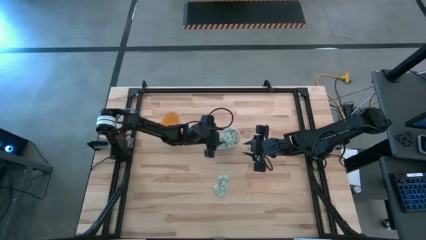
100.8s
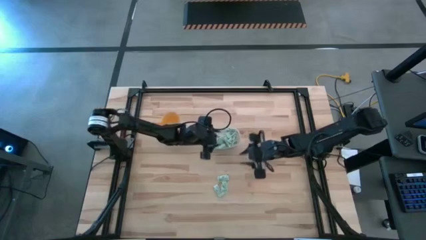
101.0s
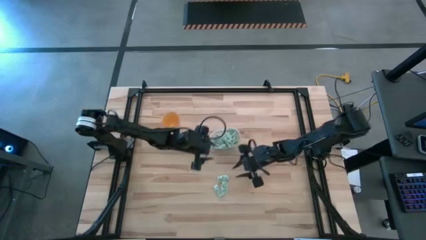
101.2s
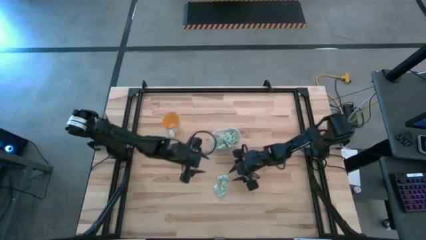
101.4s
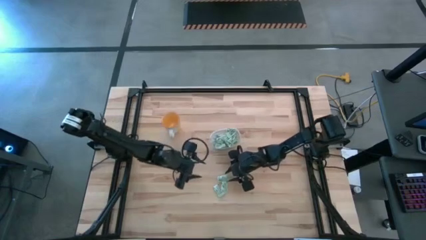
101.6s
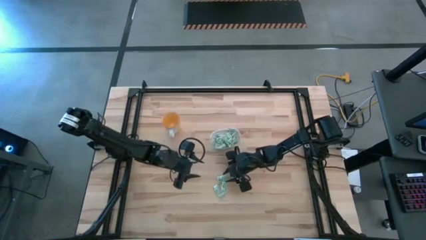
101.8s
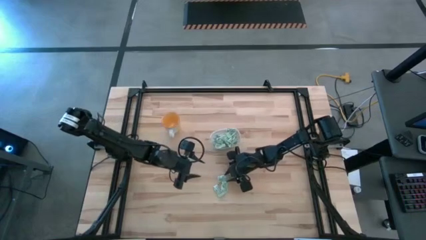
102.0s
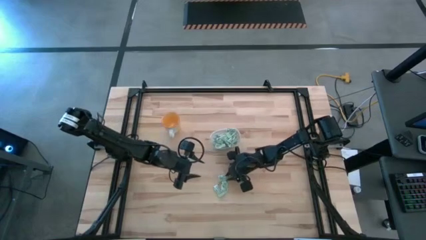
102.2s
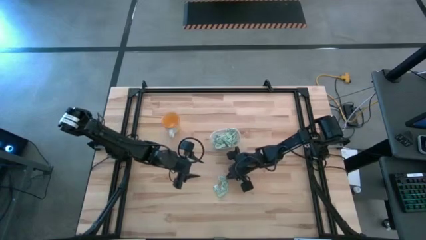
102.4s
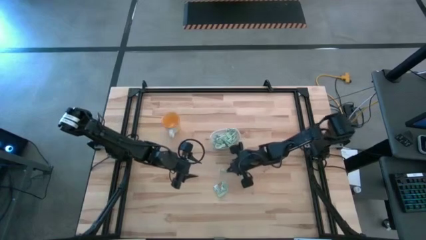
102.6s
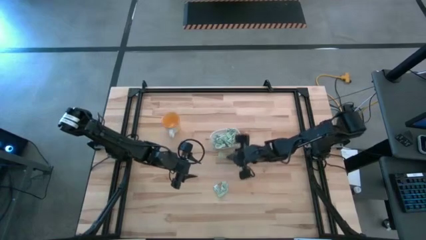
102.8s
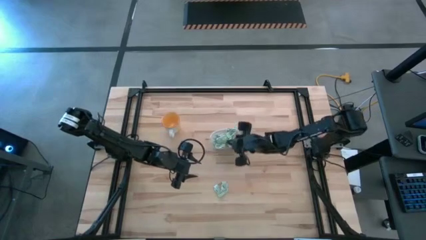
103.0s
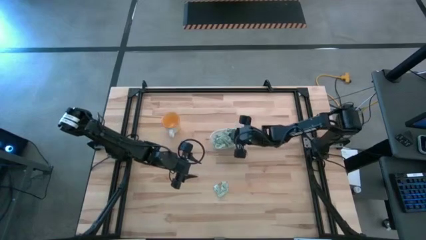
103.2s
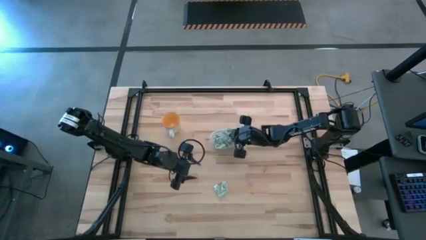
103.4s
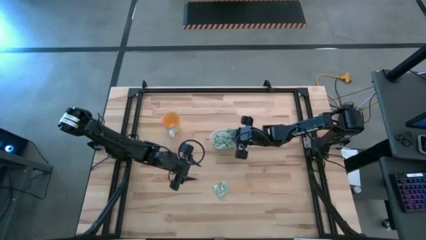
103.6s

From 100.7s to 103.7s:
Task: Pick and place Stevia / Truvia into bins
Put the stevia packet into the transparent bin

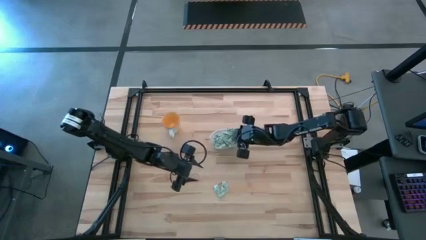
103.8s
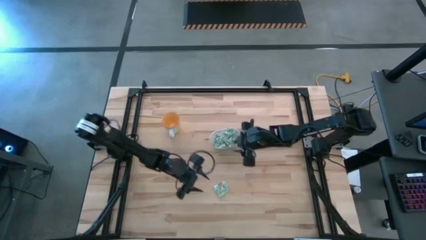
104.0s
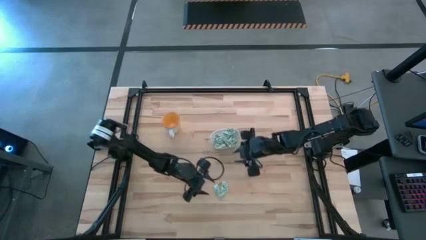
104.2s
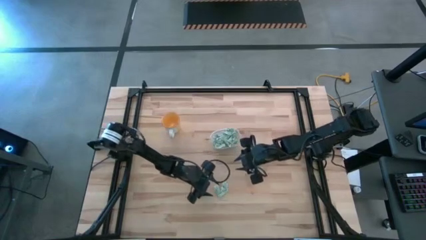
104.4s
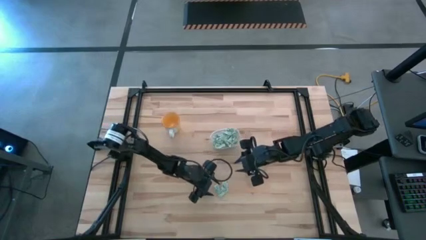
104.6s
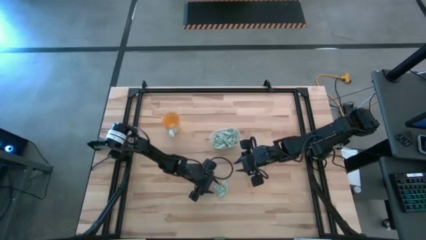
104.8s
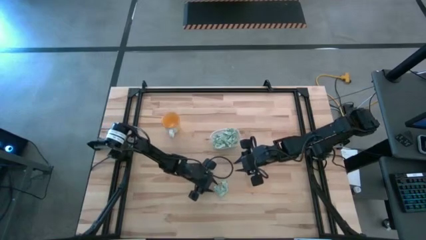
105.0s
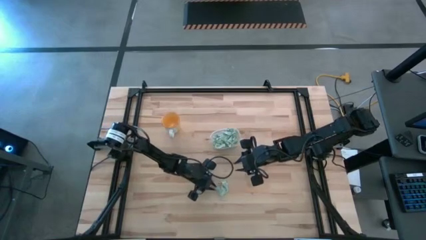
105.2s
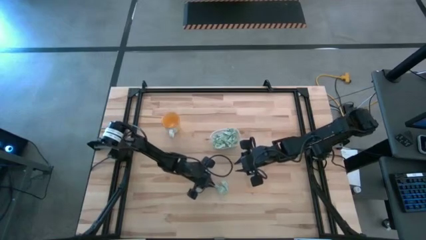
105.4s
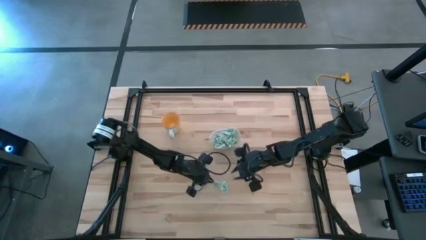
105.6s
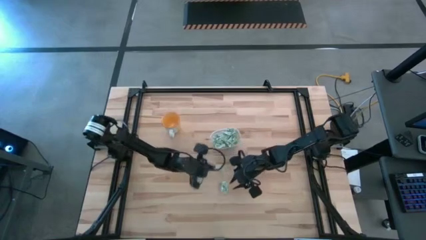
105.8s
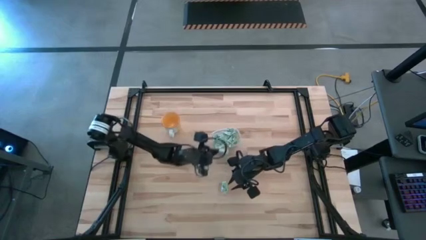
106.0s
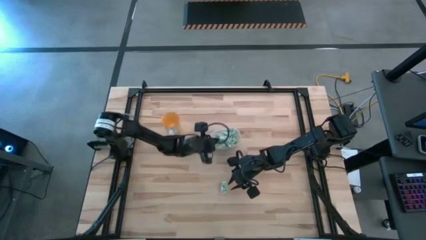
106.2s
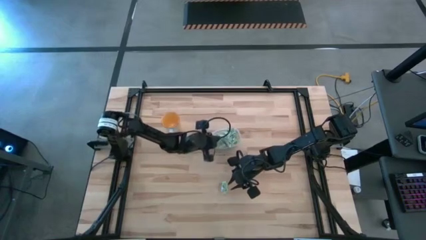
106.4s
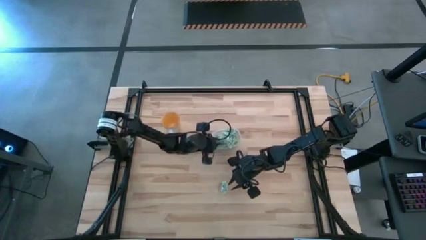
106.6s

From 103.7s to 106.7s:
Put the stevia packet into the transparent bin

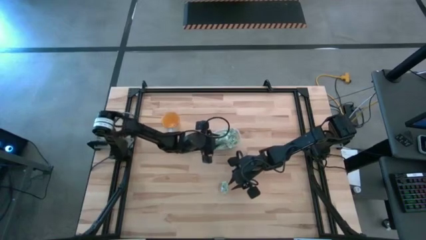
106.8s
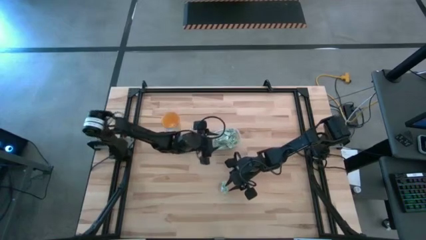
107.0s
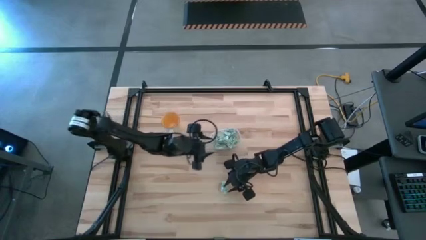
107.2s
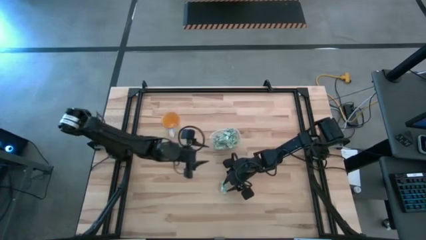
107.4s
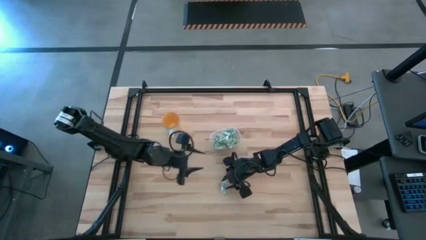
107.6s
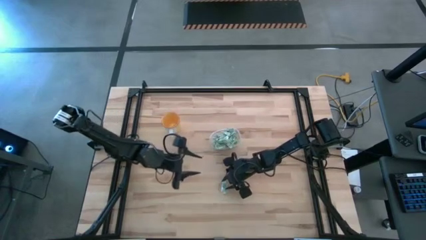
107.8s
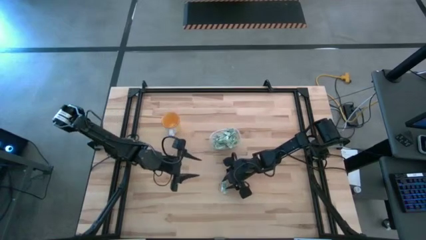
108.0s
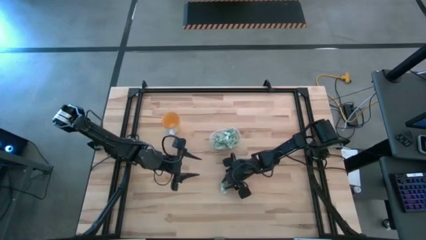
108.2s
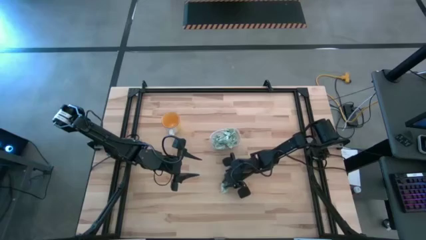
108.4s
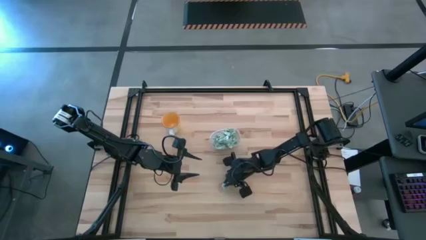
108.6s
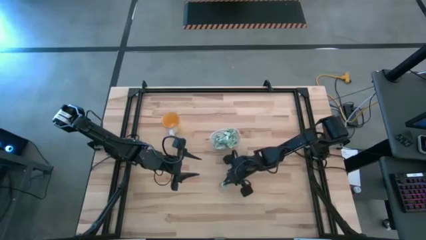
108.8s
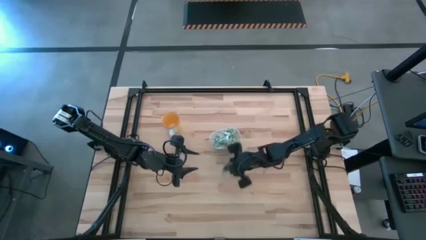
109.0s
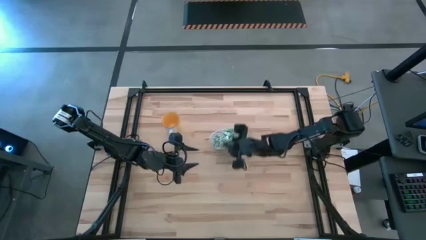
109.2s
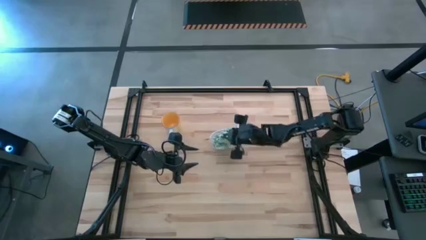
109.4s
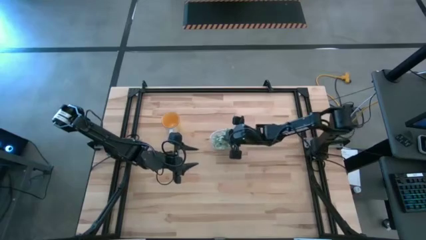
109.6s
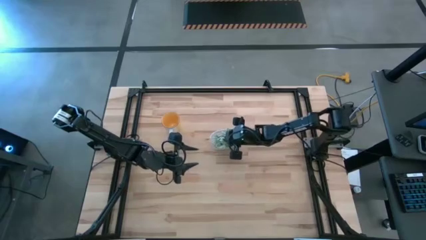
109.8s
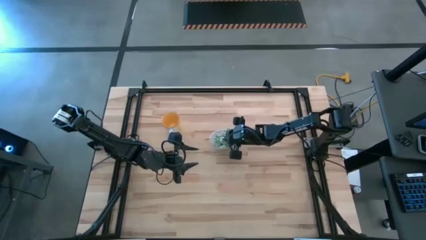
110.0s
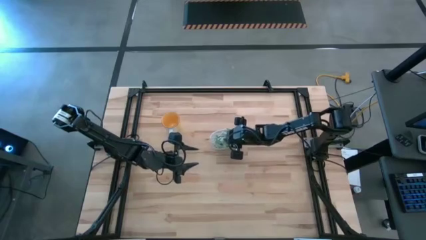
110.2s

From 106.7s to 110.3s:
Put the stevia packet into the transparent bin

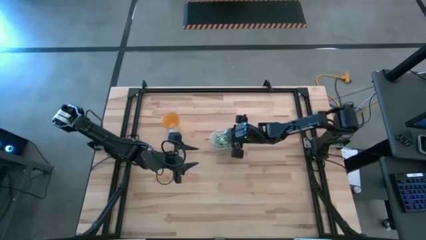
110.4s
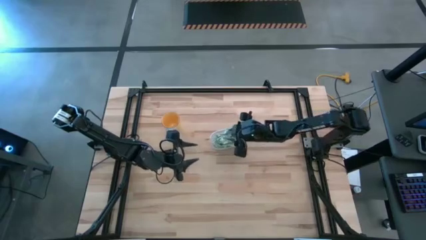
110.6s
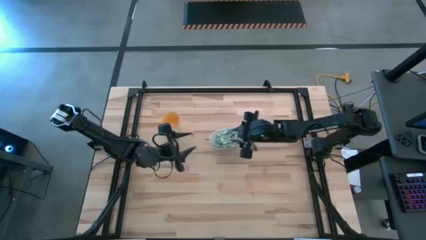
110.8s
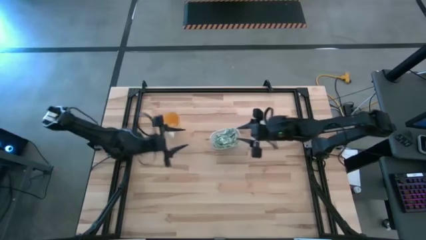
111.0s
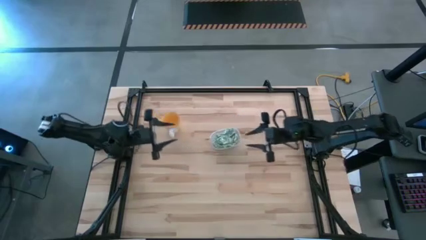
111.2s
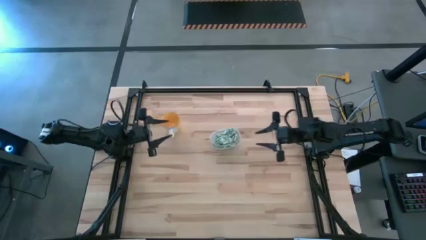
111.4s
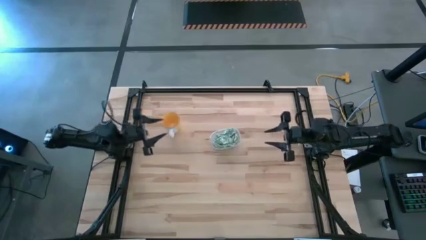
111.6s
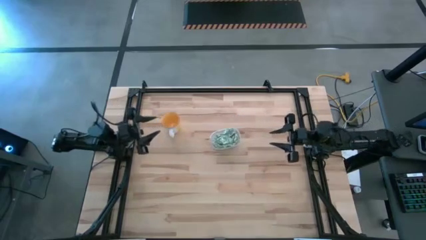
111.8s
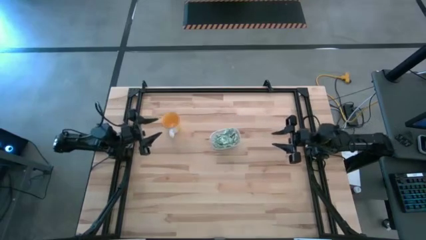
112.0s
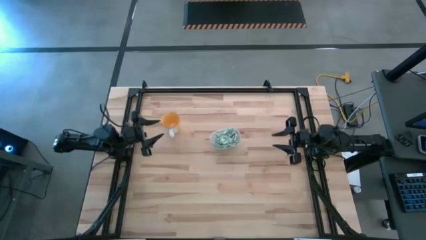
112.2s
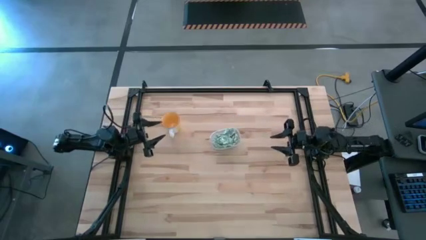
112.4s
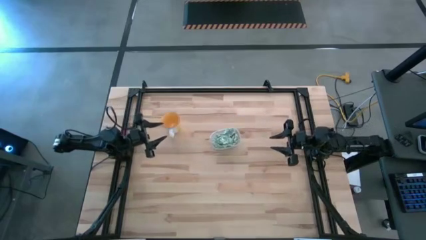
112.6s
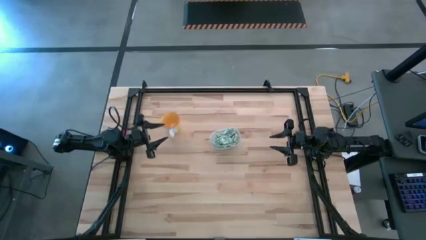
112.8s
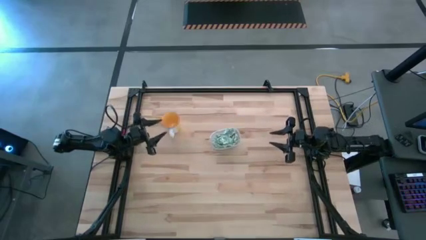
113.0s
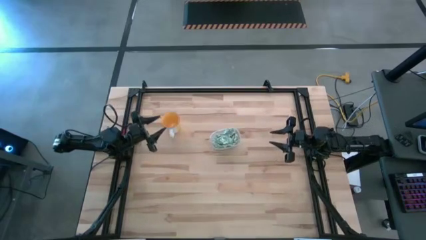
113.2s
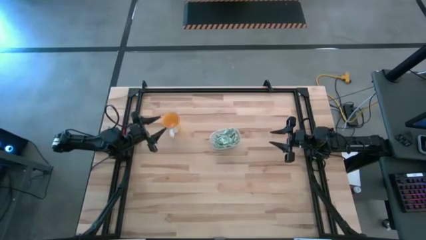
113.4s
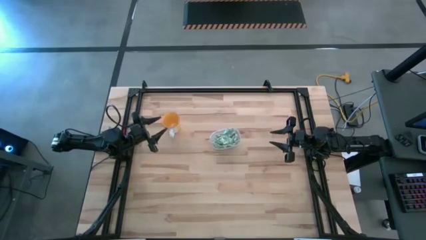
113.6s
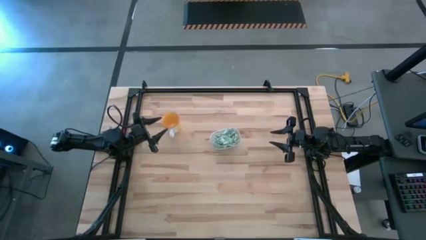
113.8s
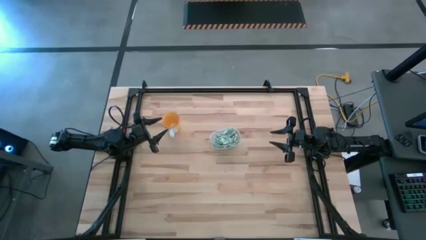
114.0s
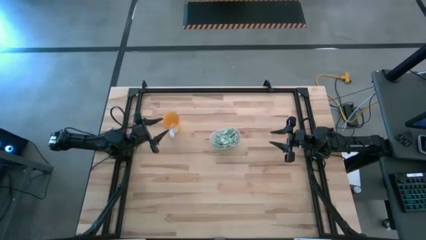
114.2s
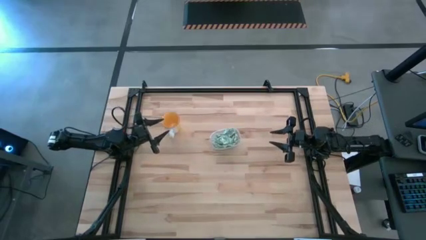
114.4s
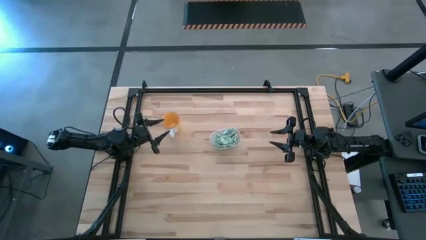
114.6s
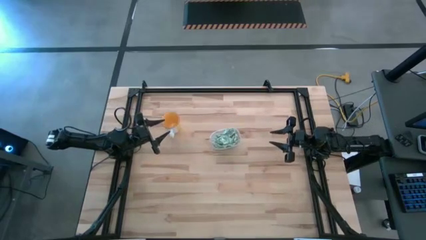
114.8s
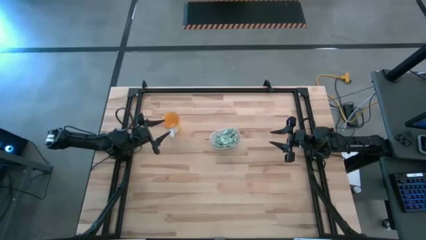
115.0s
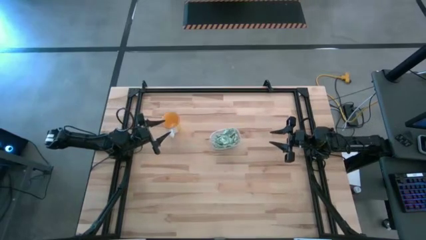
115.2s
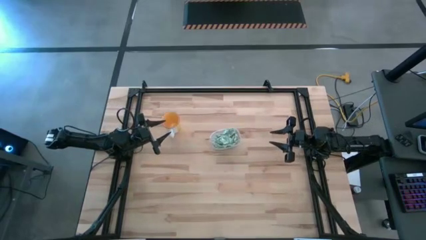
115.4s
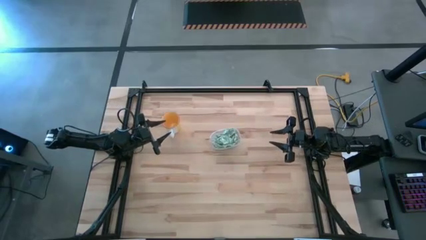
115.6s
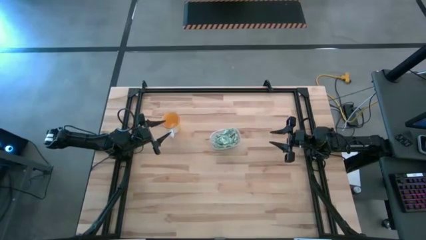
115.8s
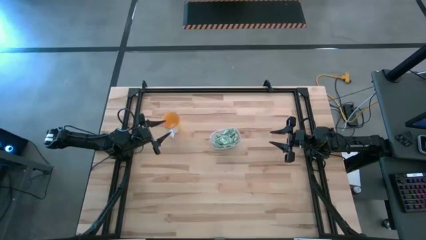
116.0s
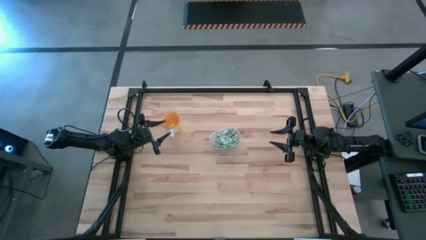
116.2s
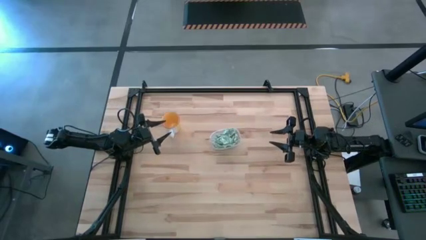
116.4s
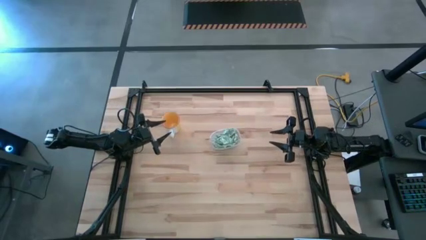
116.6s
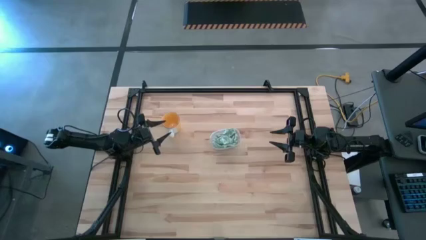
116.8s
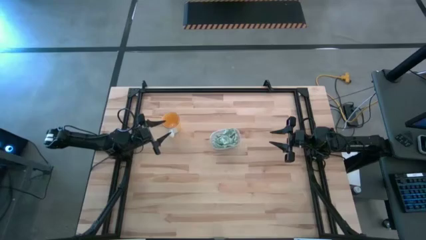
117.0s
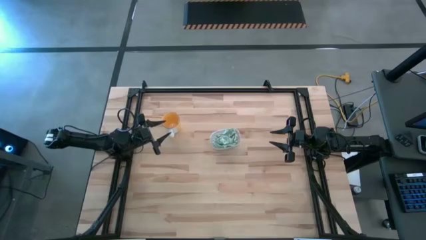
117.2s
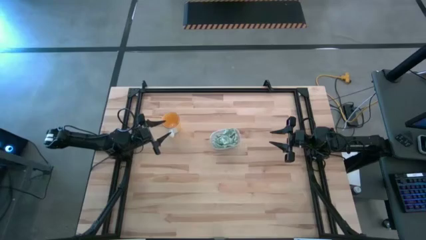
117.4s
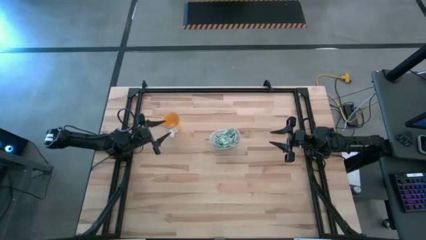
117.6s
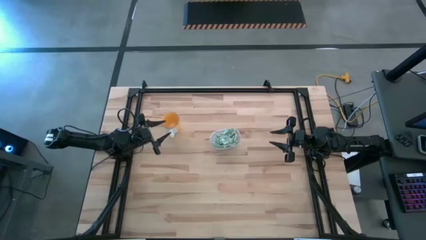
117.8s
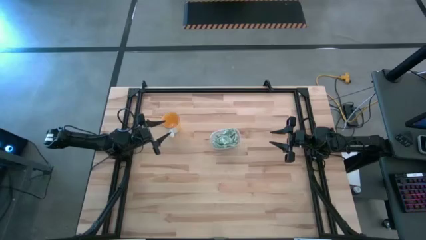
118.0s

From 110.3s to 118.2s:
Return to Home Position
